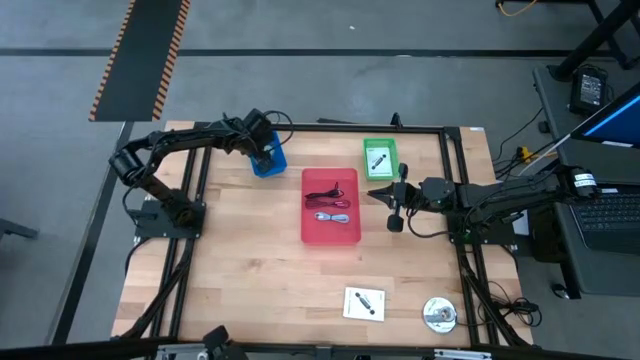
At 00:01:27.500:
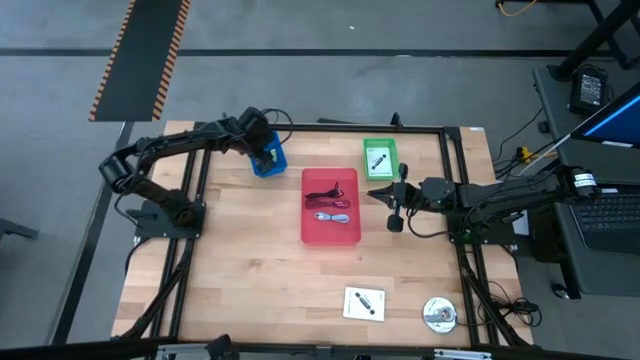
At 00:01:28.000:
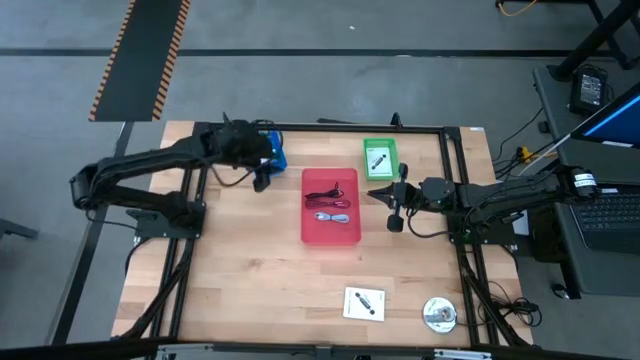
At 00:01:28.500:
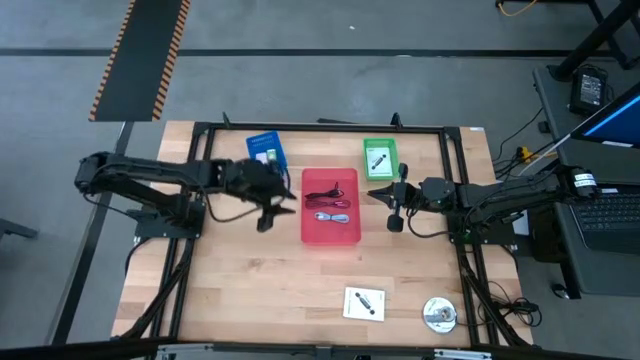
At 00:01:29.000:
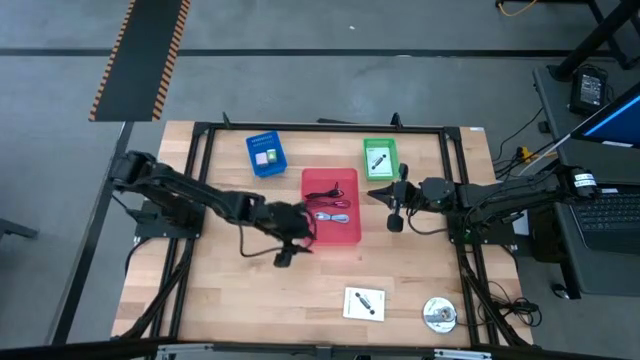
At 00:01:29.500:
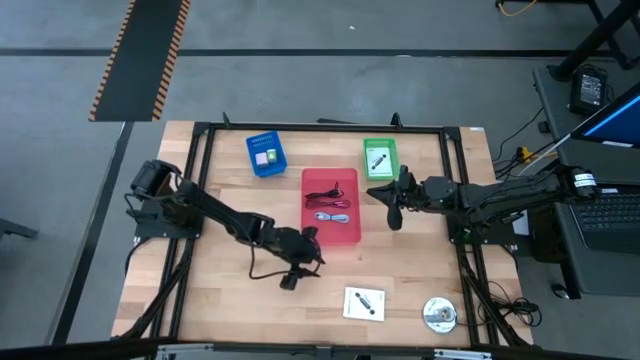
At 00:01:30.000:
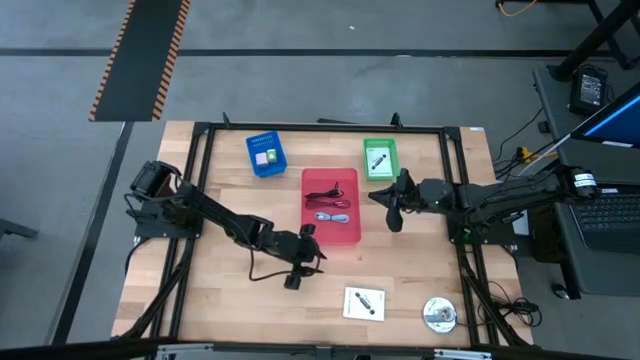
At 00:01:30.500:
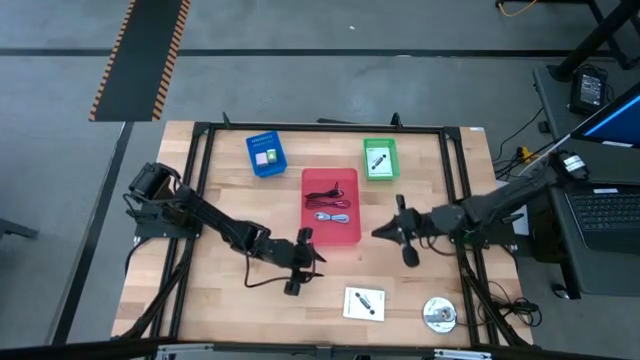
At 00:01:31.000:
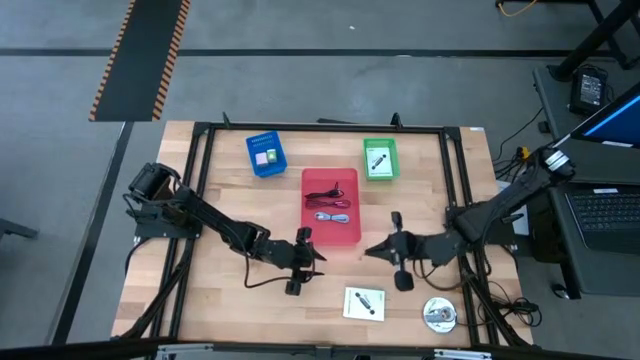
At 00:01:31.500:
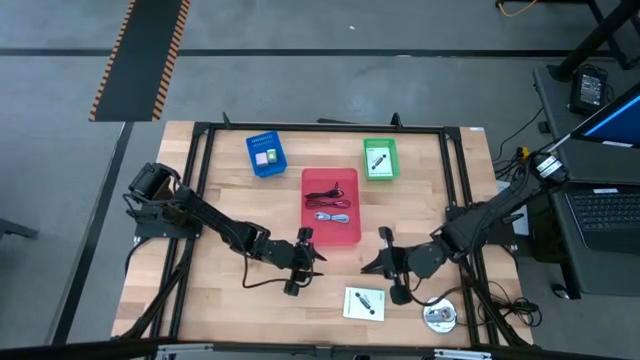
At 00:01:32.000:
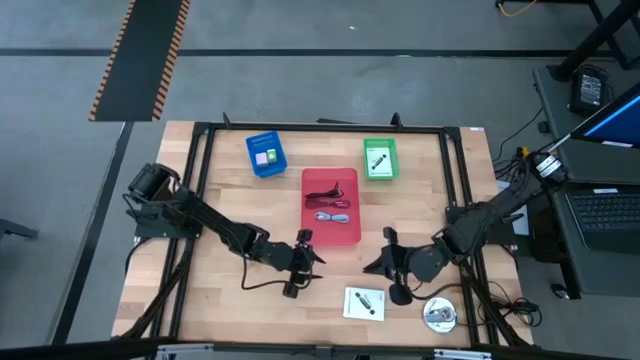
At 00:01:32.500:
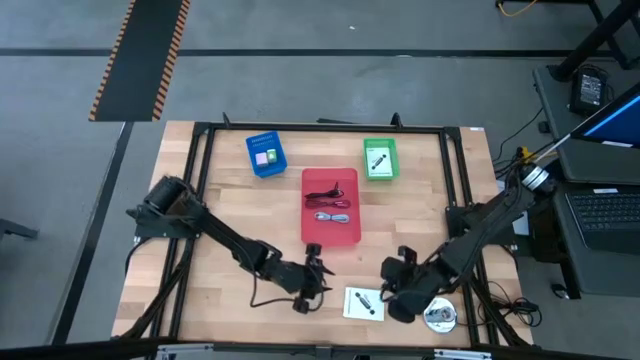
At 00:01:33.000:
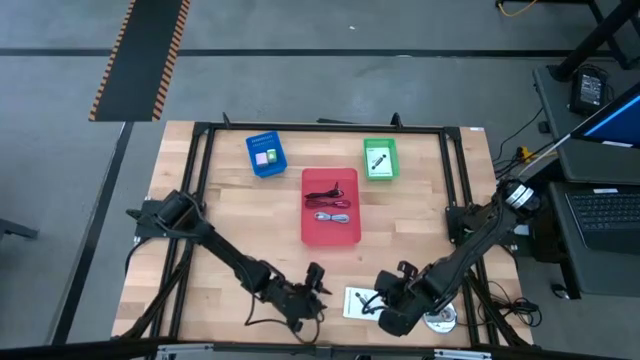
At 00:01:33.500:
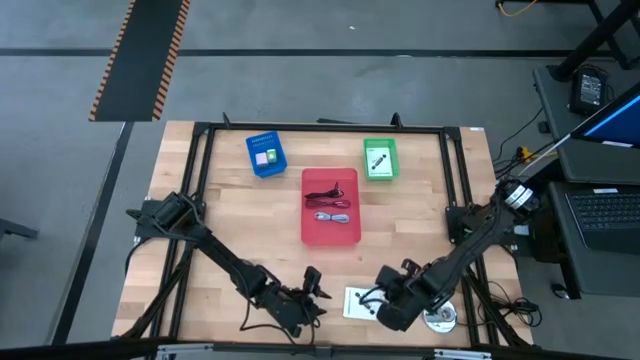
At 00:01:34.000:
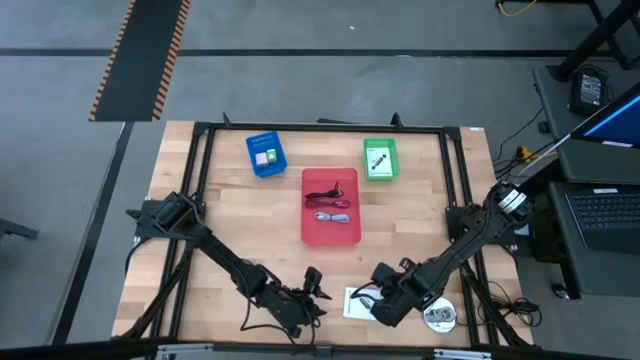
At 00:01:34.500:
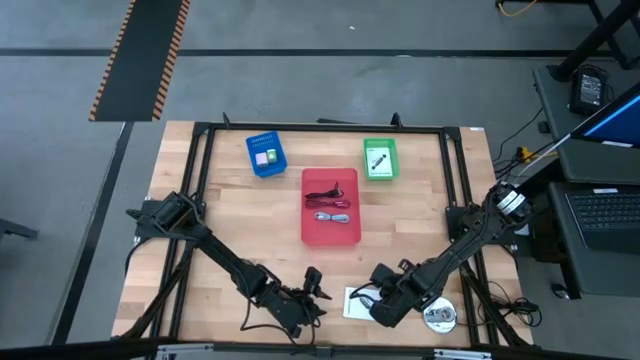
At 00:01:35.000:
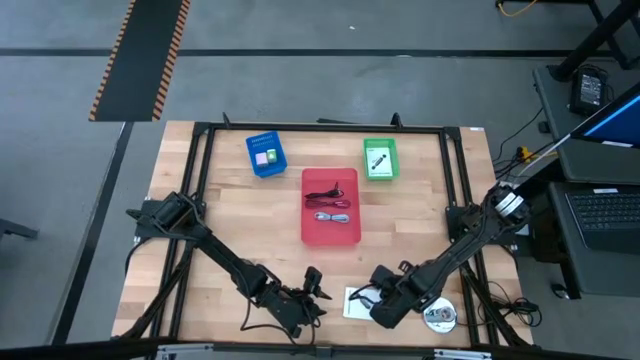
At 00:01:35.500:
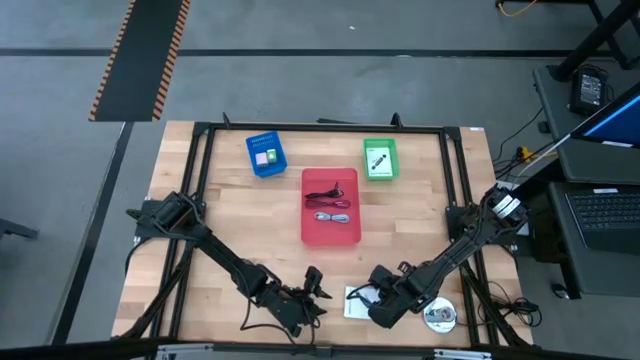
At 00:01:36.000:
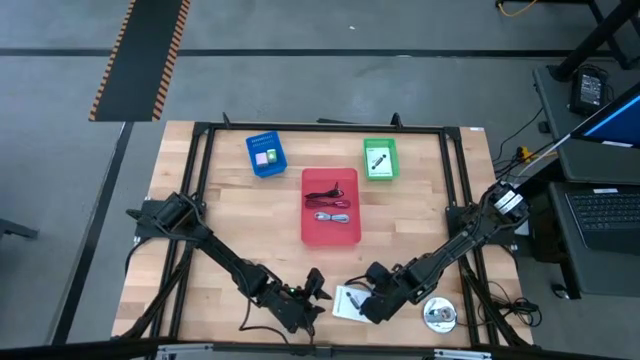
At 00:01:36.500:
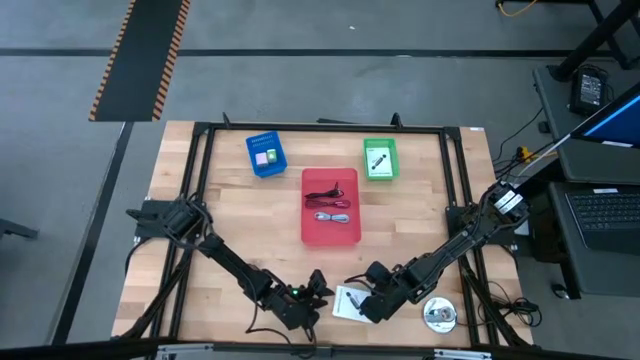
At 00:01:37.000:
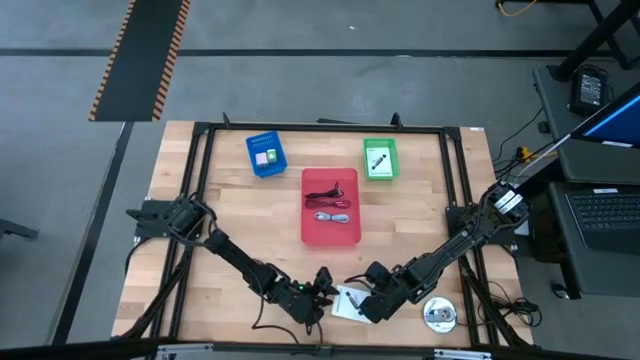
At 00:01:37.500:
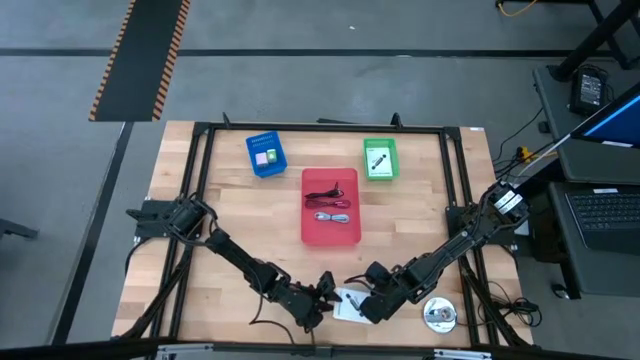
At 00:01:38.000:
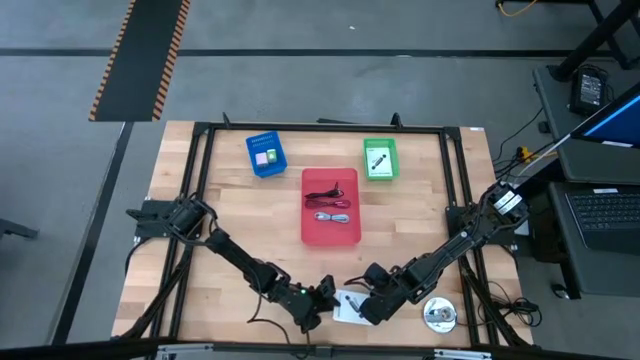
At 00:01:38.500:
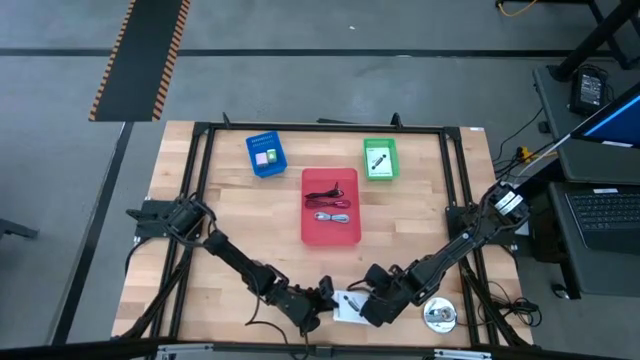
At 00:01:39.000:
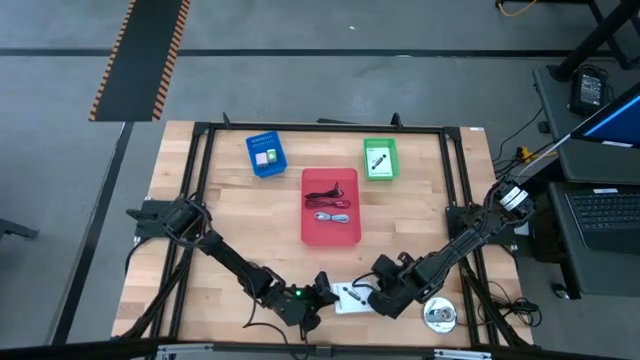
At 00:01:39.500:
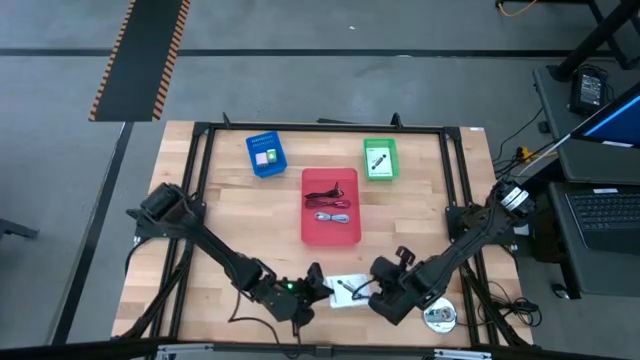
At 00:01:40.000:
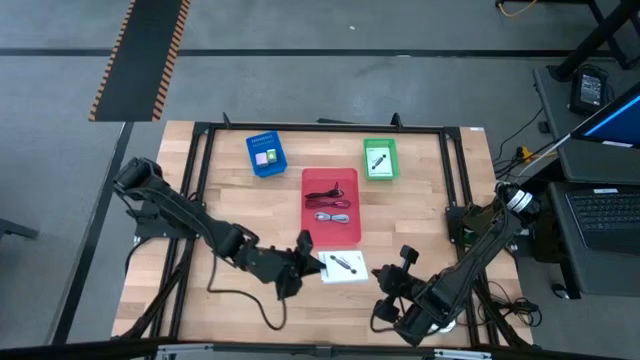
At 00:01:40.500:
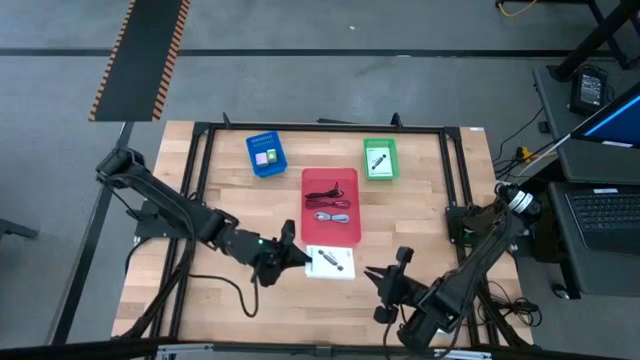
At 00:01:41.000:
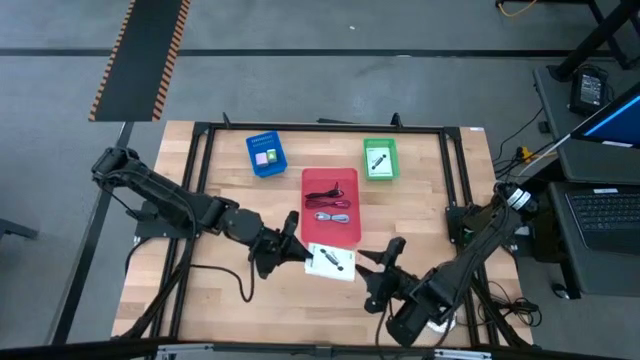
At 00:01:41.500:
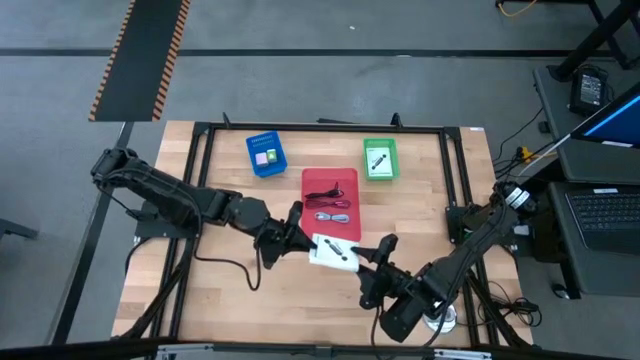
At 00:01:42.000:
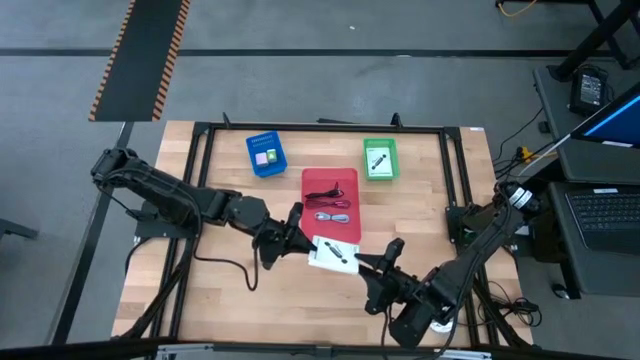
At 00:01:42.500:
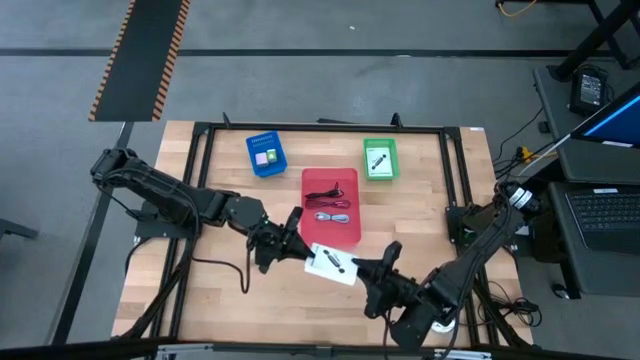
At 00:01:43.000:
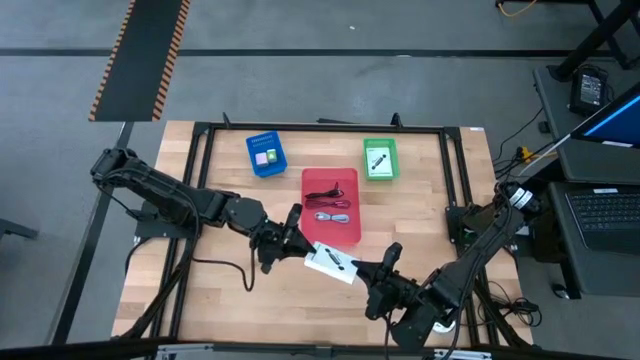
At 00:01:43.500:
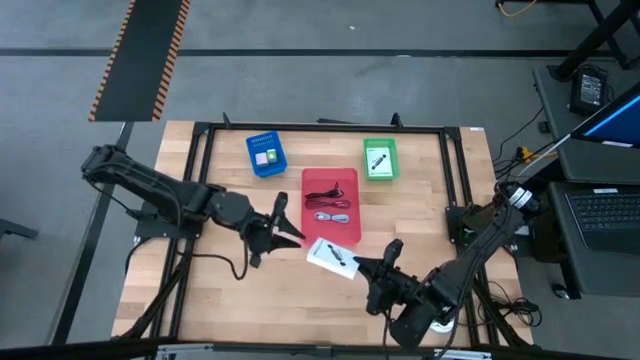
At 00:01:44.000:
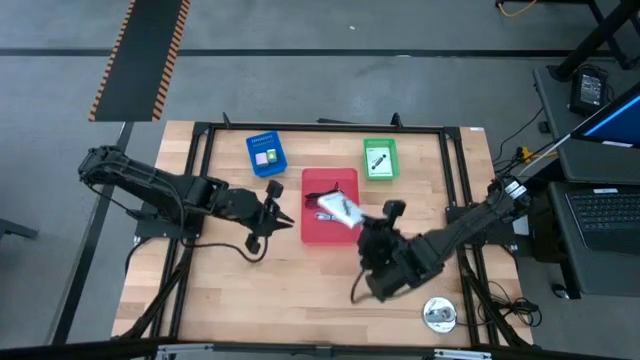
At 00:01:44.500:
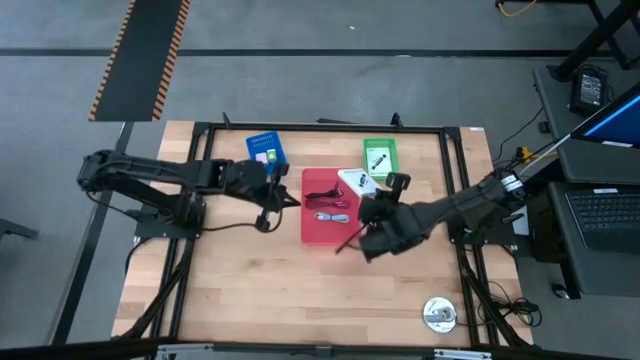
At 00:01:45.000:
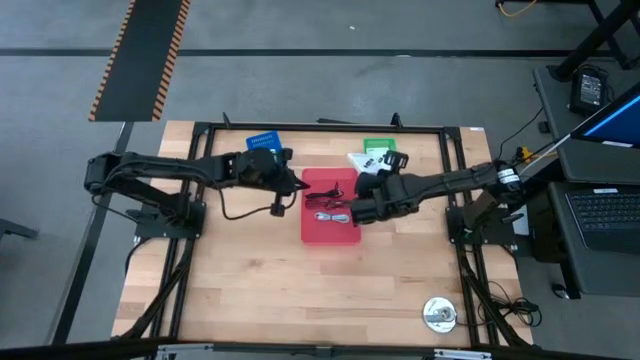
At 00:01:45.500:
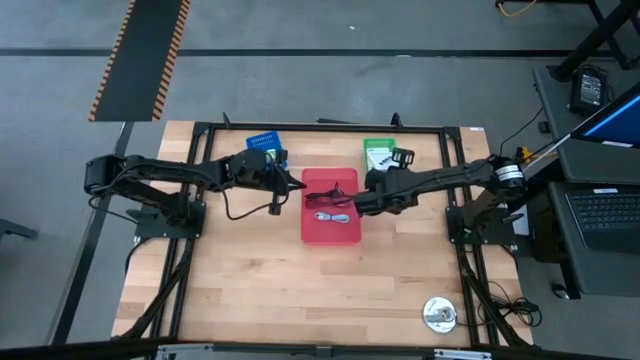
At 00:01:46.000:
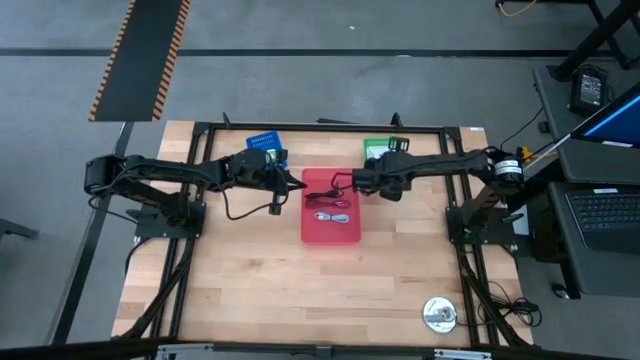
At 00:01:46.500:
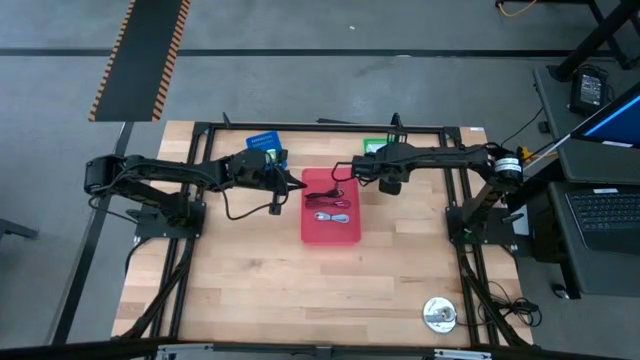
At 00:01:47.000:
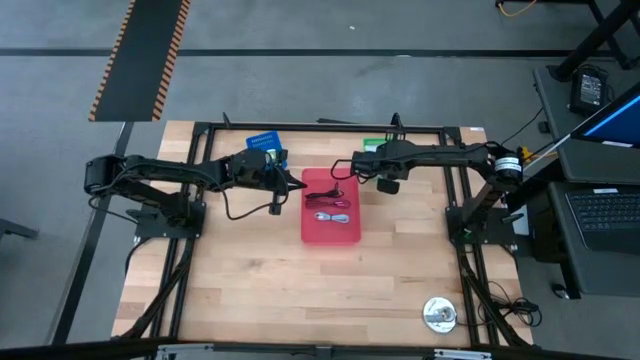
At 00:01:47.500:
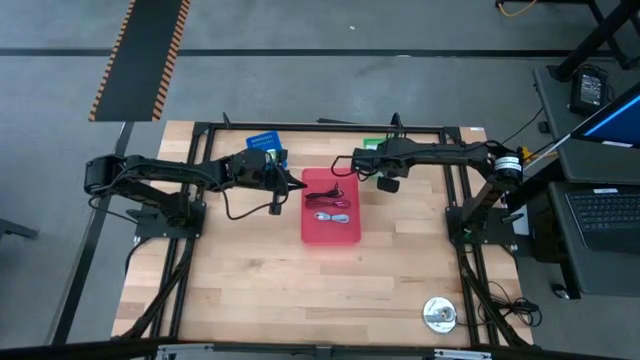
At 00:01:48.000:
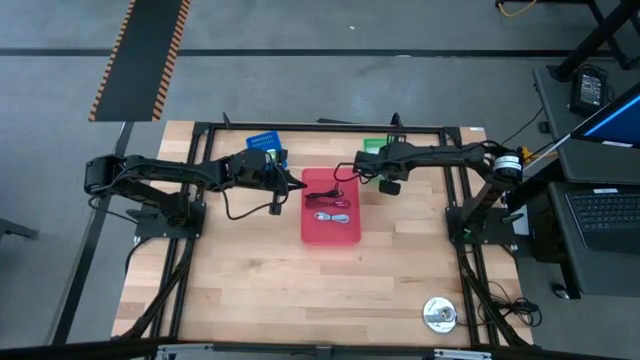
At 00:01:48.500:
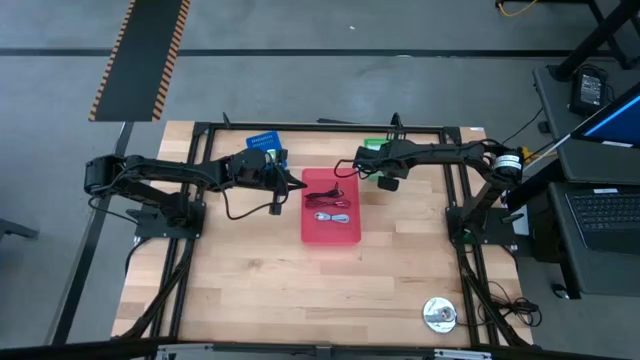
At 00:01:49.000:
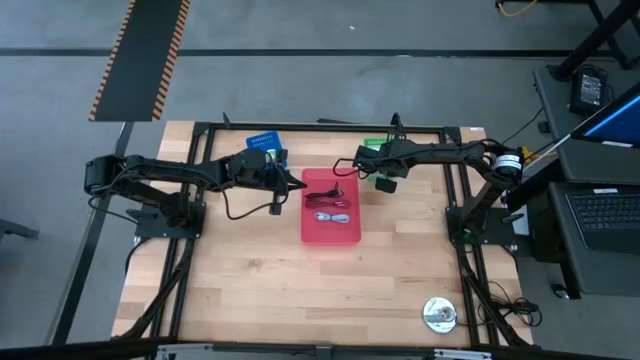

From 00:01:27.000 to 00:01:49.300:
Task: Pick and place items into bin
Put the card reader box into the green bin
